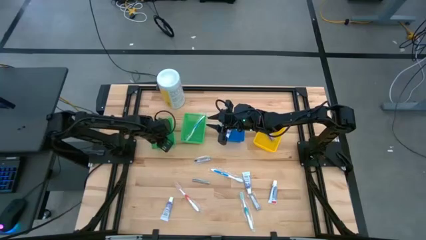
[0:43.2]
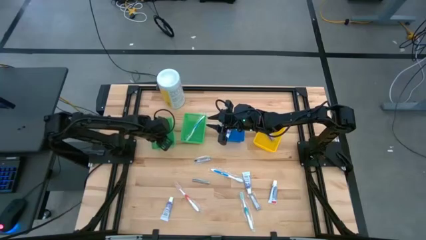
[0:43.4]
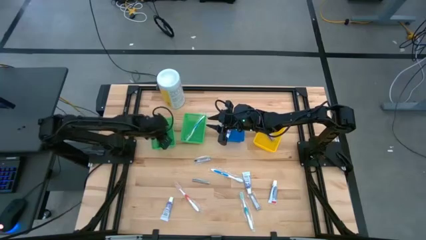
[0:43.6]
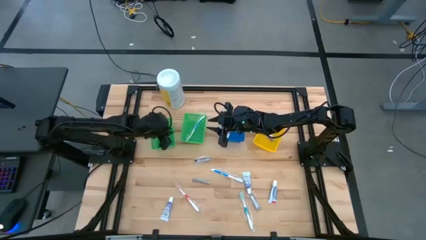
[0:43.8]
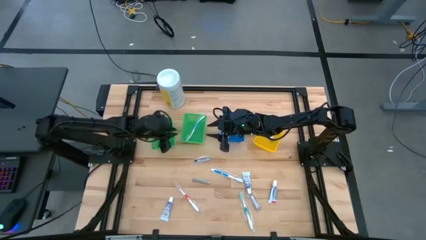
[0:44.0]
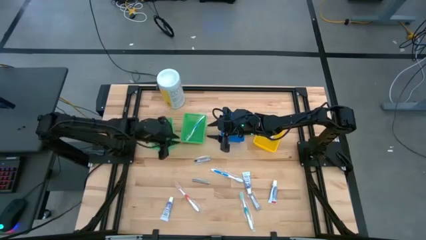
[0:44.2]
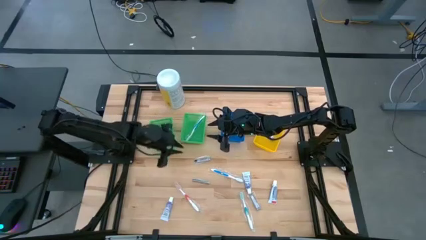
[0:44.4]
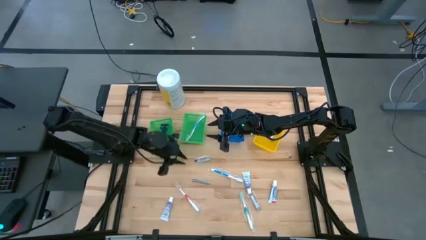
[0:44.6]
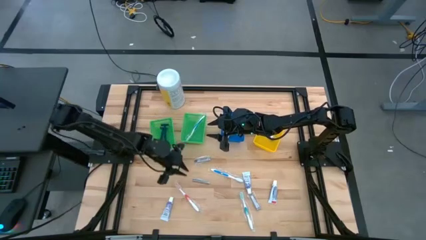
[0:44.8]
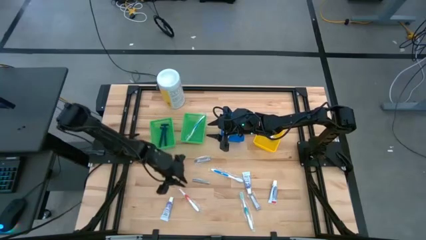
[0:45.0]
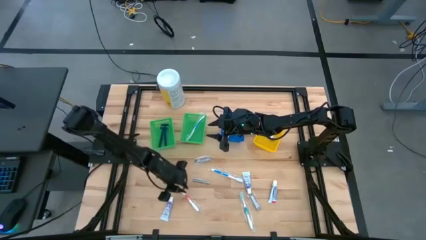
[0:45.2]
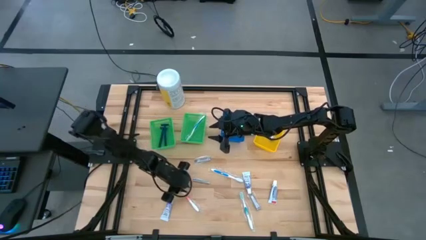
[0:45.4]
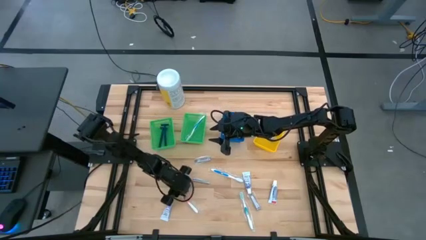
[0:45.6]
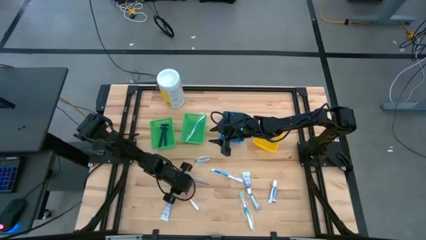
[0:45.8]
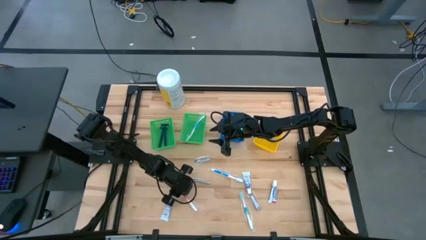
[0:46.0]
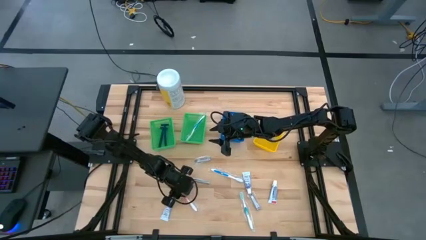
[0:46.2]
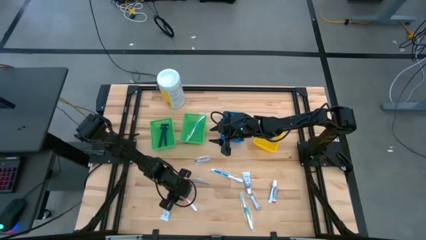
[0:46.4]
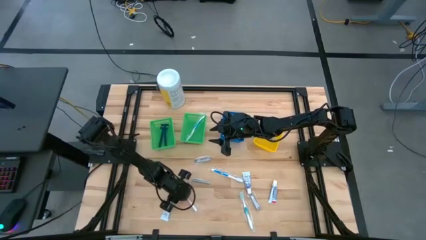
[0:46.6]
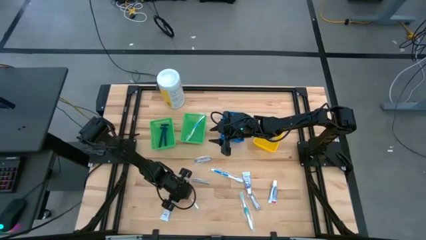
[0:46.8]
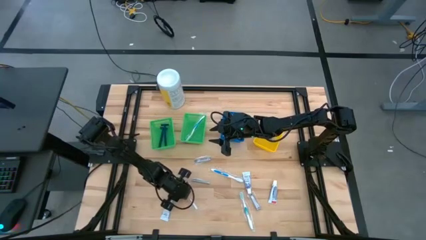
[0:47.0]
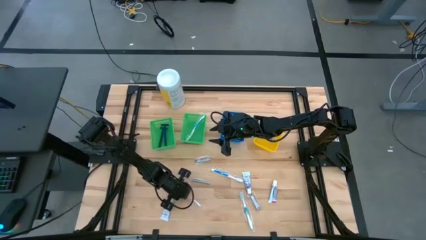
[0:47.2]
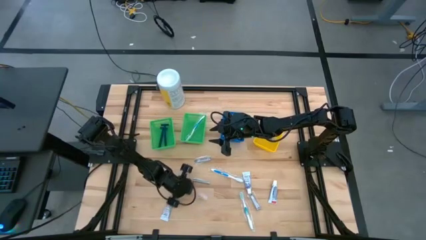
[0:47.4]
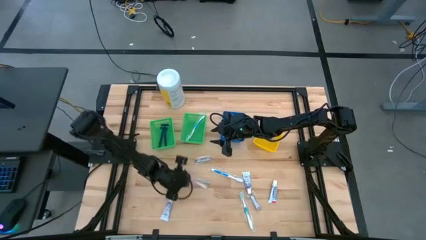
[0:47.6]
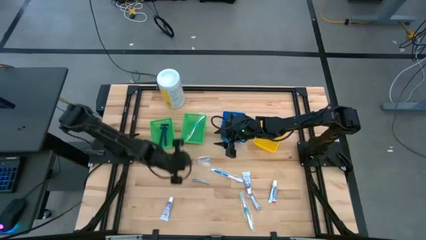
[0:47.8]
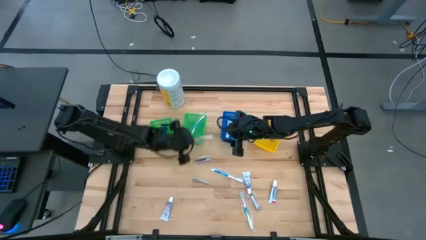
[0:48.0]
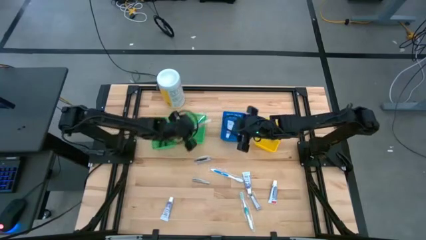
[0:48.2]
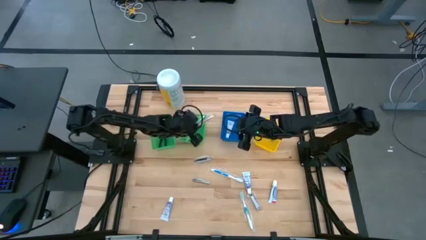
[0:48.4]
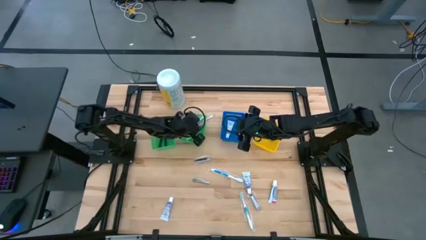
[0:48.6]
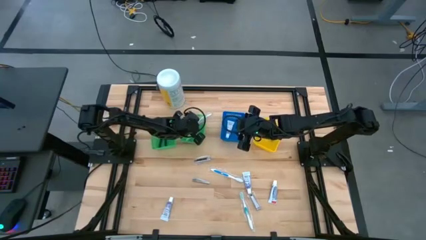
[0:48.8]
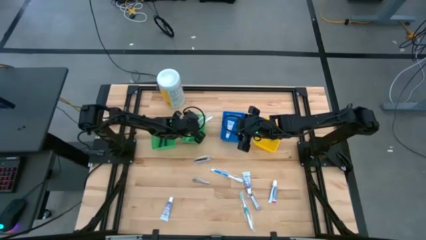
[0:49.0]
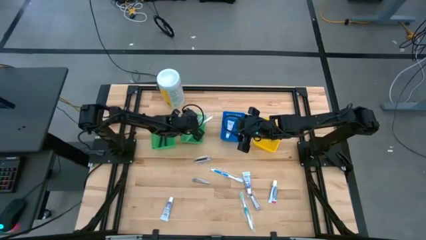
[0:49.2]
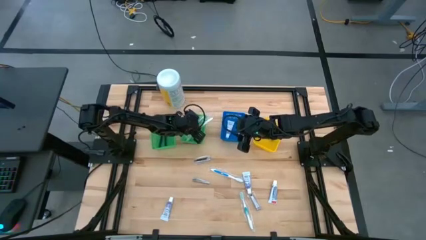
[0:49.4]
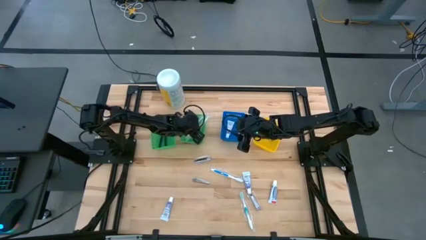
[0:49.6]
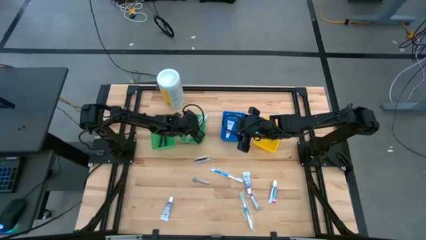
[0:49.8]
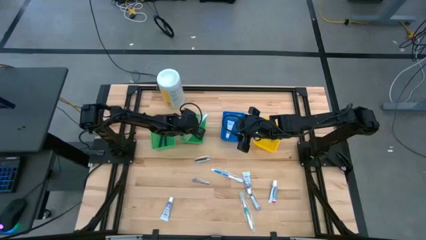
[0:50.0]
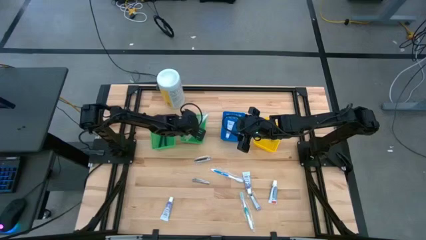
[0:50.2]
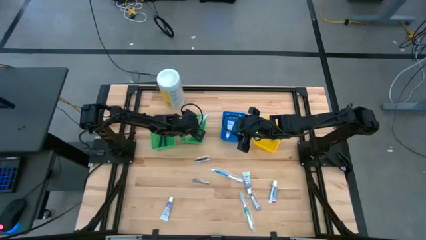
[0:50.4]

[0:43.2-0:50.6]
Task: Pick & Place Travel size toiletries
Put the red toothbrush into the right green bin

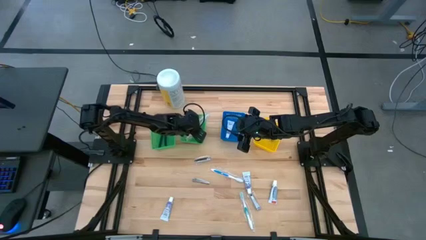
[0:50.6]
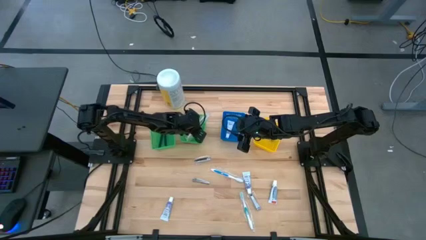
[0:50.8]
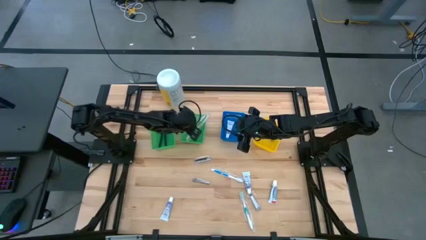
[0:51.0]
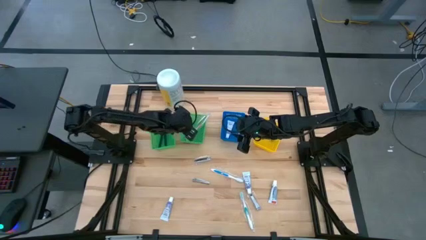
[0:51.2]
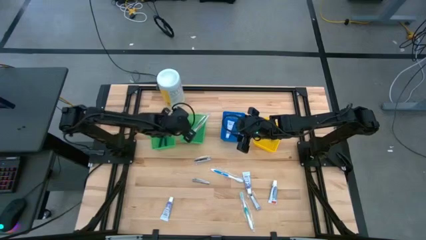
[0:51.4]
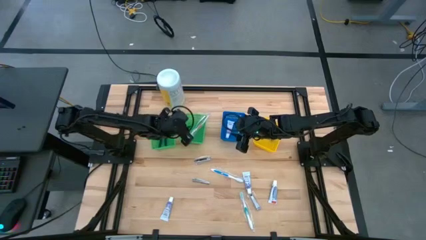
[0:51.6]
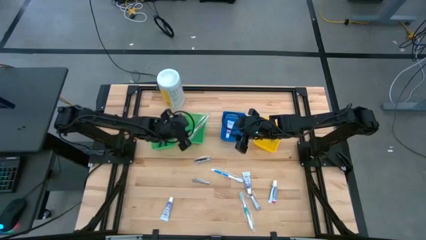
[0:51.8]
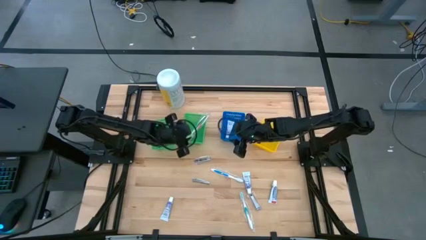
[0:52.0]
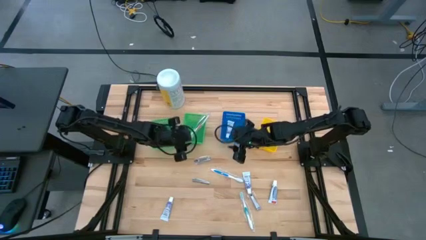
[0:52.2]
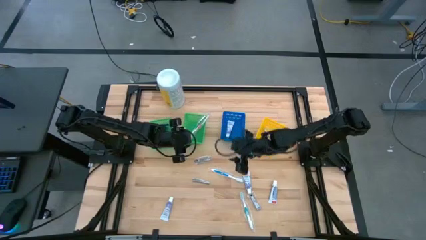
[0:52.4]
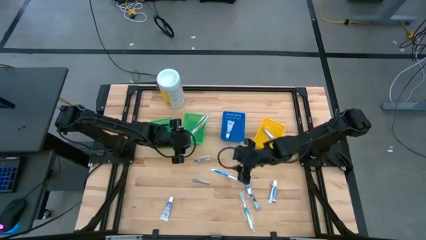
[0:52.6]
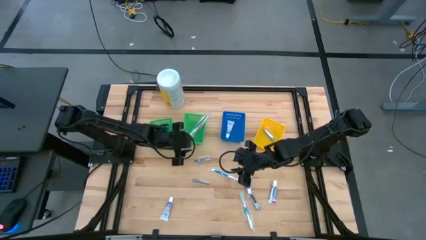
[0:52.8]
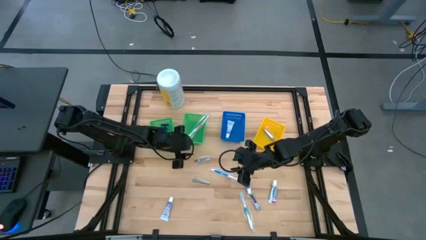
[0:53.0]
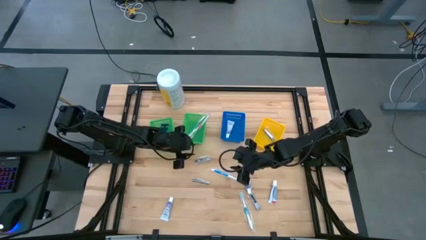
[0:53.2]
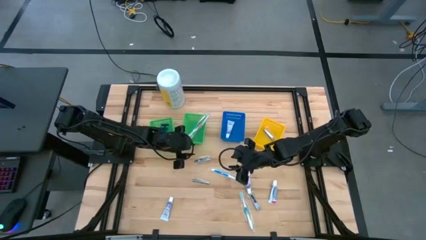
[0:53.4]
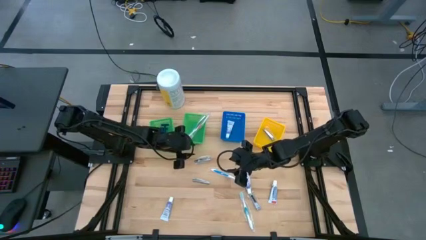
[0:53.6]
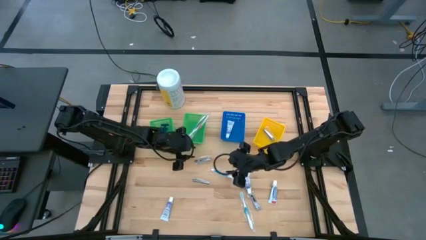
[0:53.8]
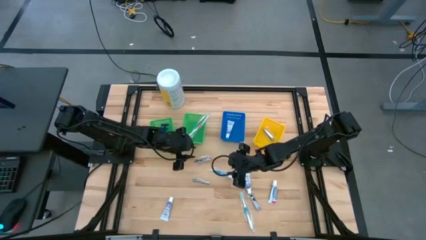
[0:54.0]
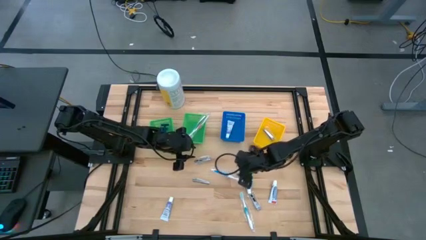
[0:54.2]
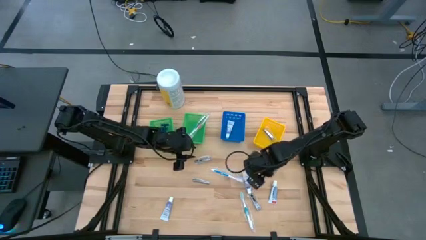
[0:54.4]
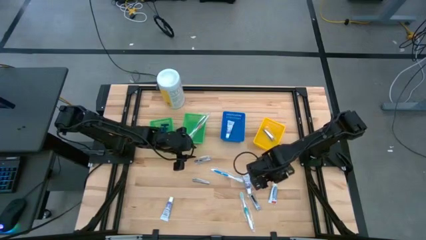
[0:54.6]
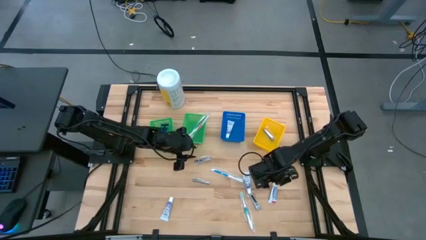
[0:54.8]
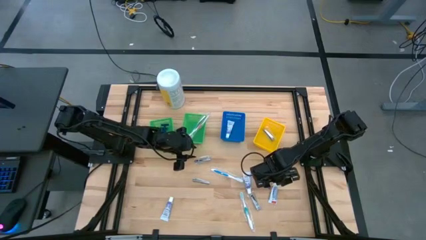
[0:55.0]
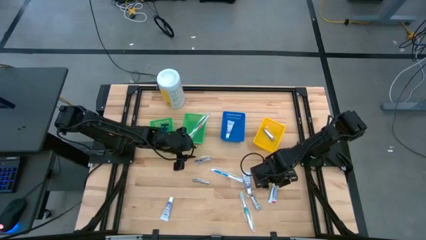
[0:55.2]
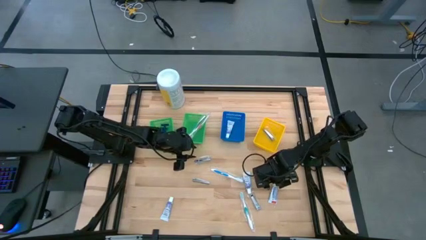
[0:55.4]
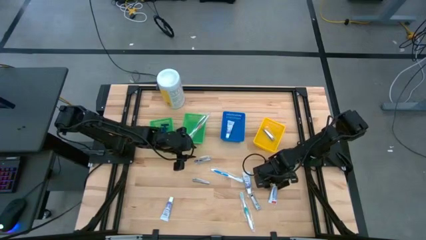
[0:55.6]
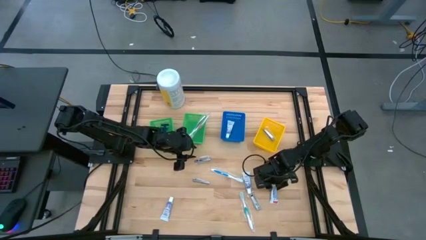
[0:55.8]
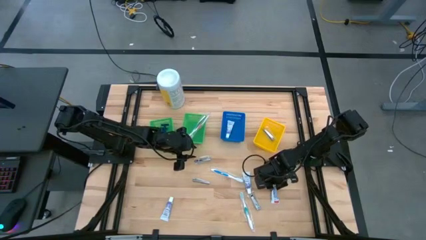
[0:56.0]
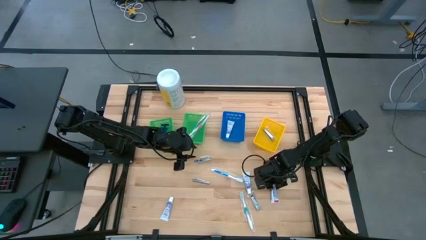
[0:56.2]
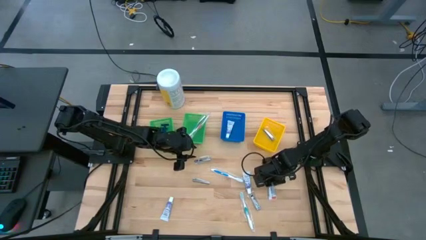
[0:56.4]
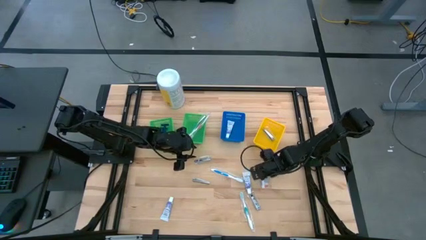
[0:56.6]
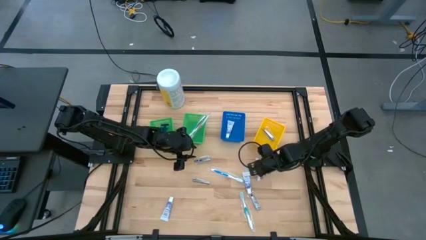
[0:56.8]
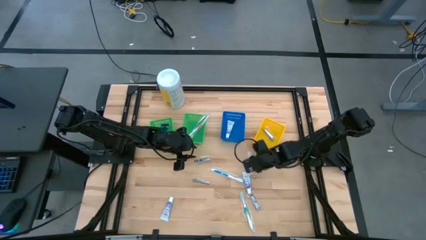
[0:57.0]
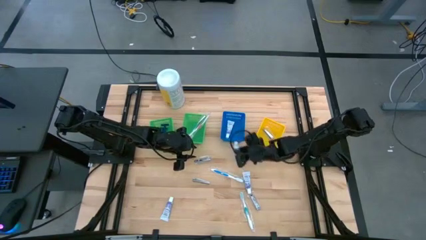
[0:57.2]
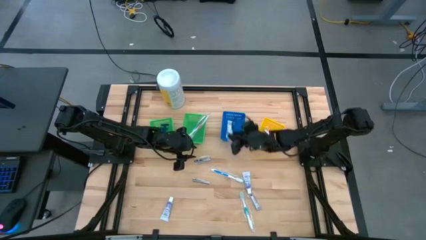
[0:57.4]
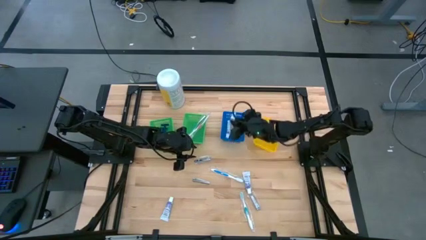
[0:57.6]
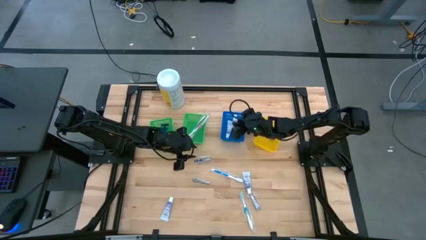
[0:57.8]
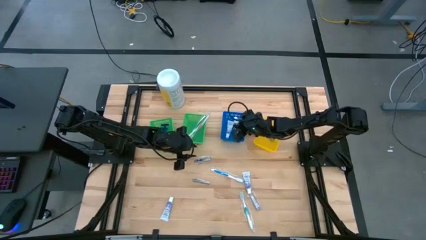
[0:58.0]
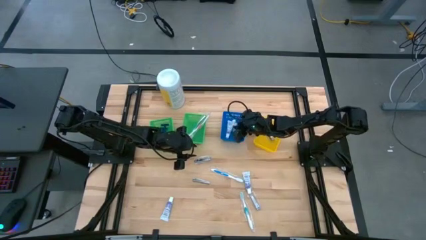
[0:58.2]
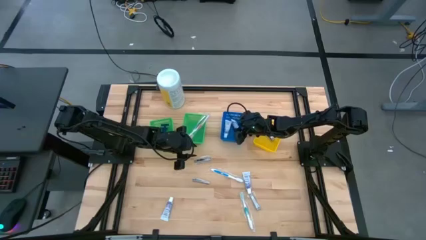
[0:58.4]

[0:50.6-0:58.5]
Put the purple toothpaste into the blue bin
